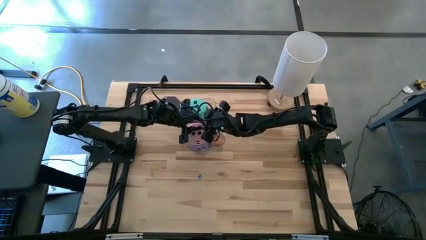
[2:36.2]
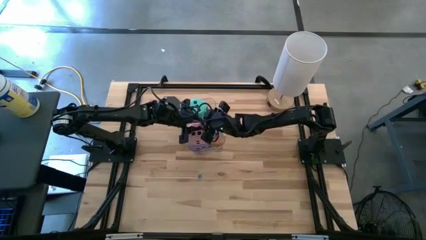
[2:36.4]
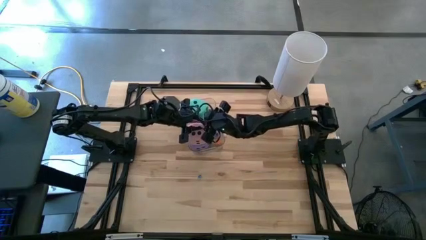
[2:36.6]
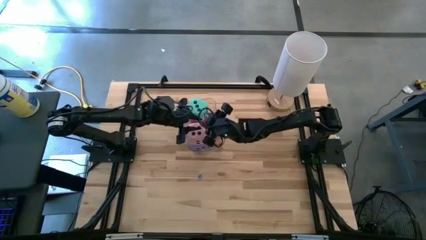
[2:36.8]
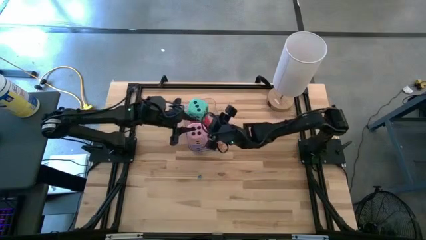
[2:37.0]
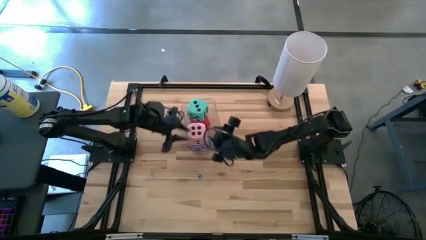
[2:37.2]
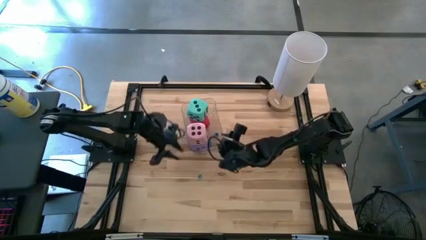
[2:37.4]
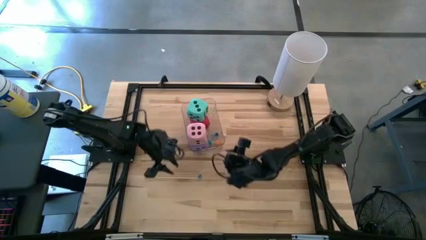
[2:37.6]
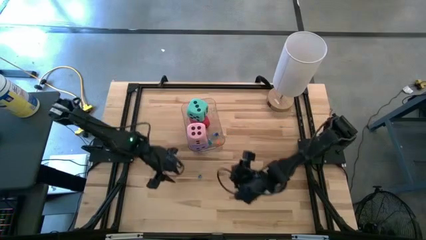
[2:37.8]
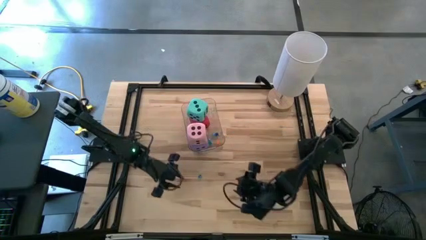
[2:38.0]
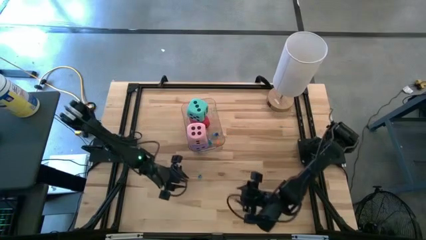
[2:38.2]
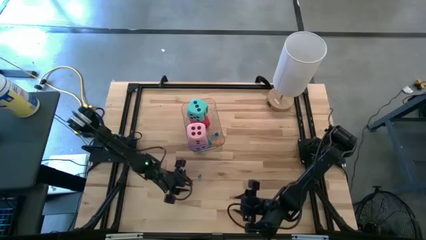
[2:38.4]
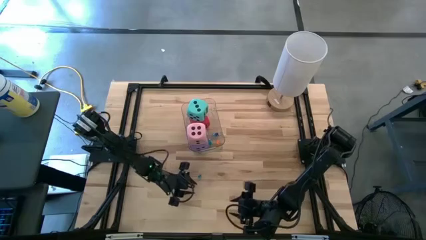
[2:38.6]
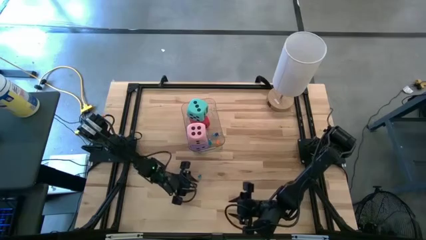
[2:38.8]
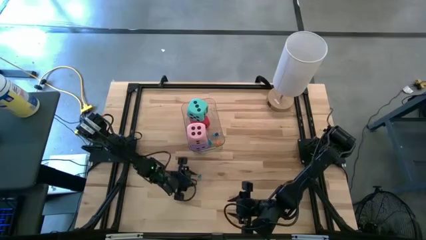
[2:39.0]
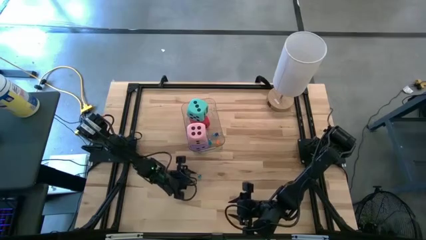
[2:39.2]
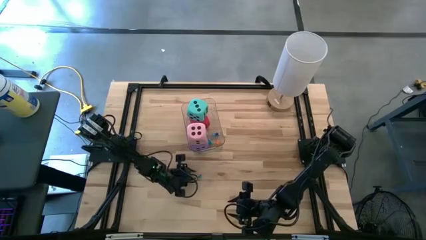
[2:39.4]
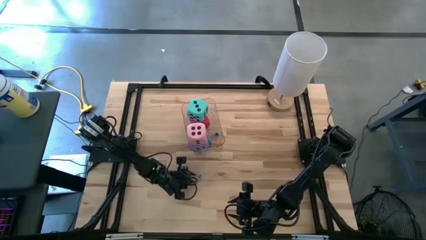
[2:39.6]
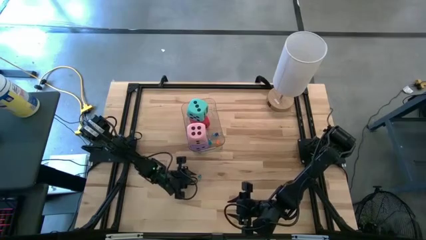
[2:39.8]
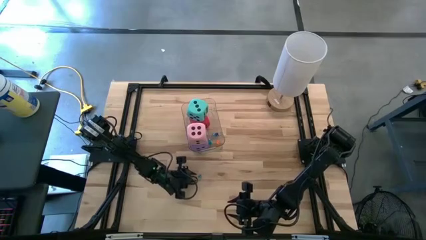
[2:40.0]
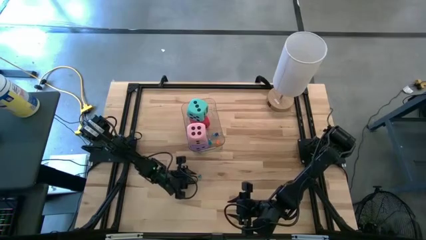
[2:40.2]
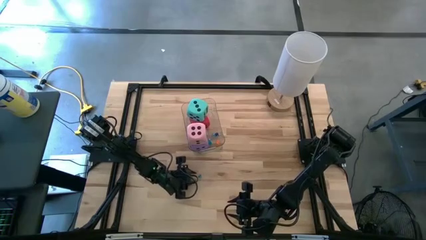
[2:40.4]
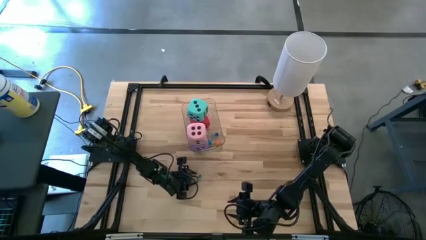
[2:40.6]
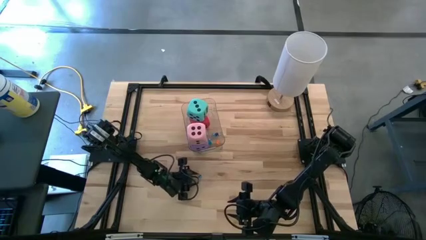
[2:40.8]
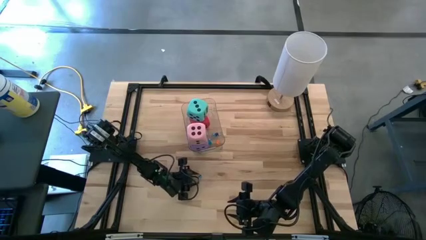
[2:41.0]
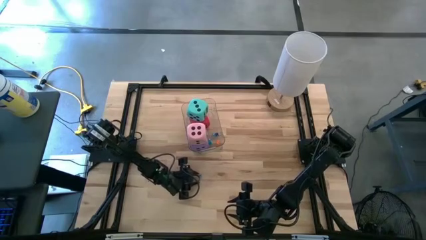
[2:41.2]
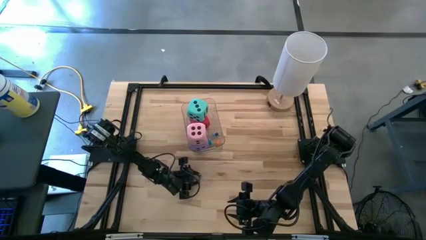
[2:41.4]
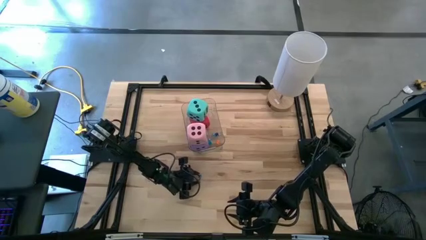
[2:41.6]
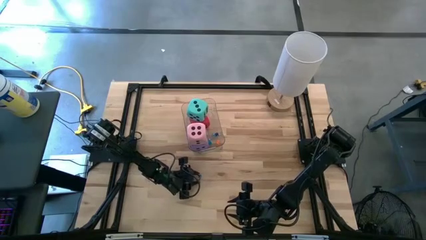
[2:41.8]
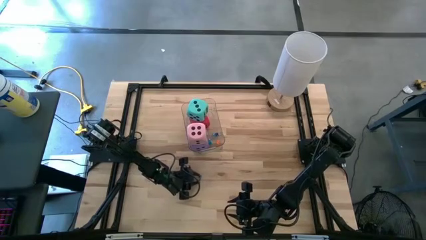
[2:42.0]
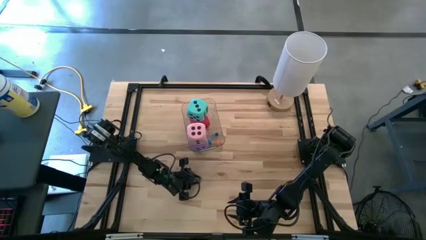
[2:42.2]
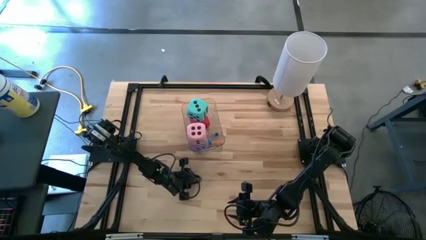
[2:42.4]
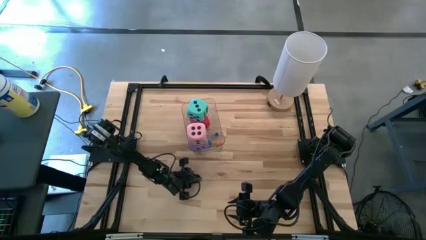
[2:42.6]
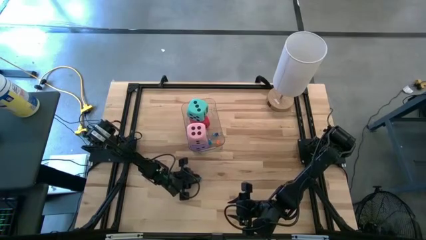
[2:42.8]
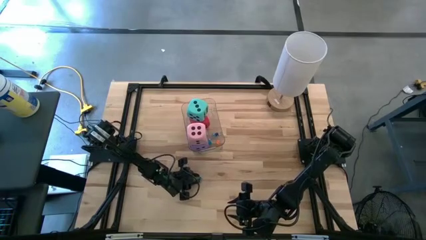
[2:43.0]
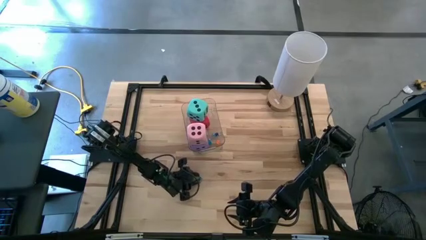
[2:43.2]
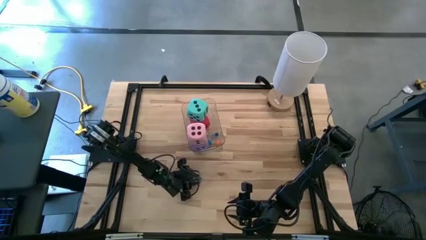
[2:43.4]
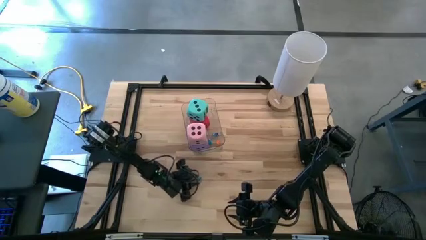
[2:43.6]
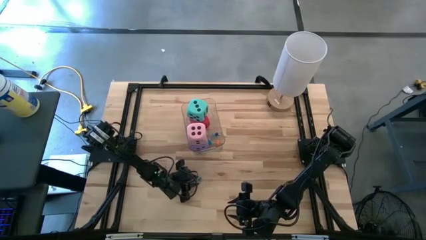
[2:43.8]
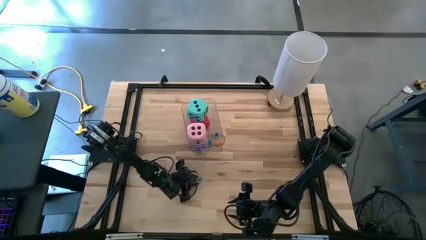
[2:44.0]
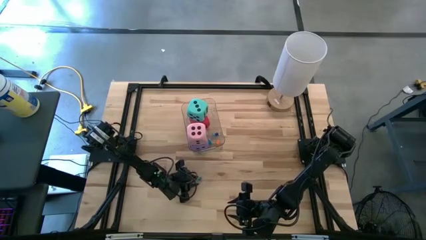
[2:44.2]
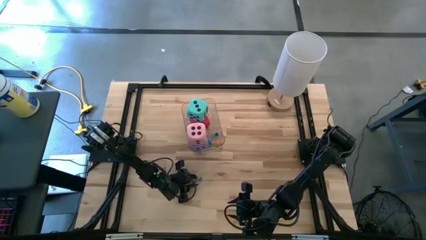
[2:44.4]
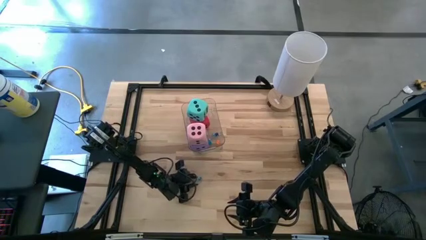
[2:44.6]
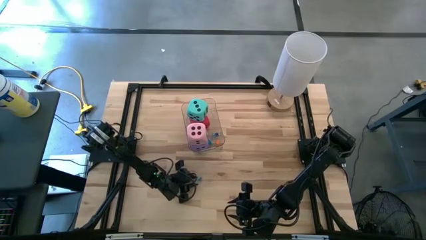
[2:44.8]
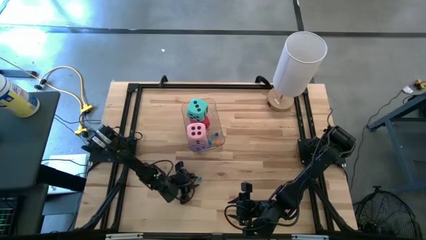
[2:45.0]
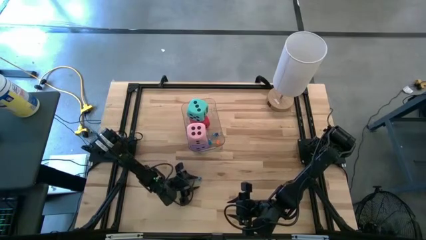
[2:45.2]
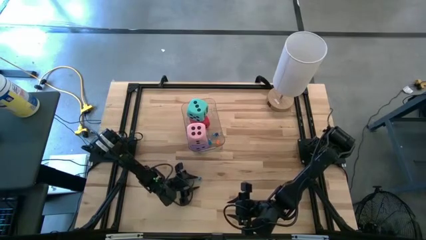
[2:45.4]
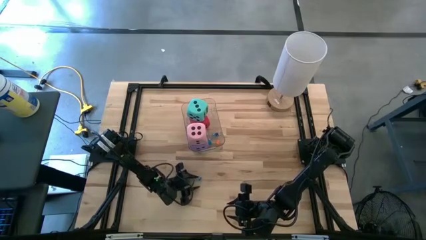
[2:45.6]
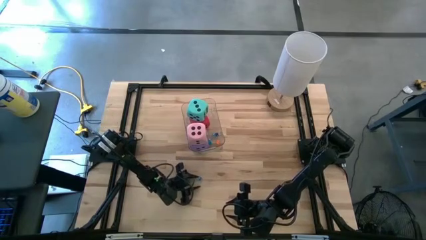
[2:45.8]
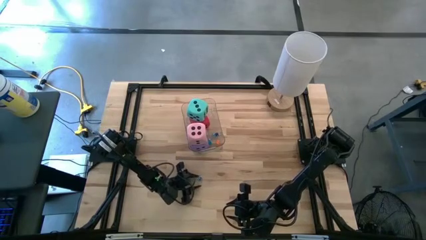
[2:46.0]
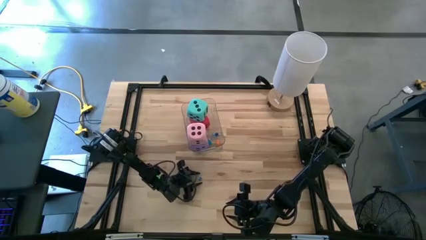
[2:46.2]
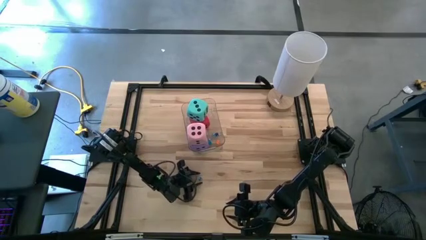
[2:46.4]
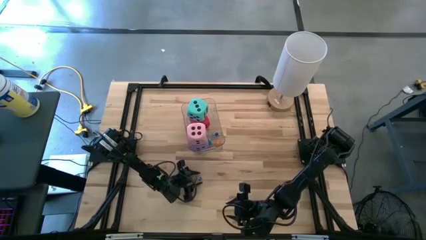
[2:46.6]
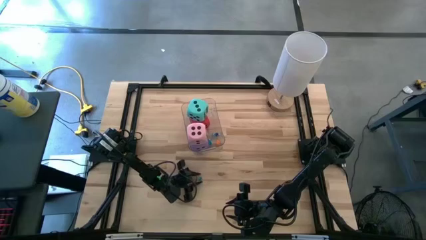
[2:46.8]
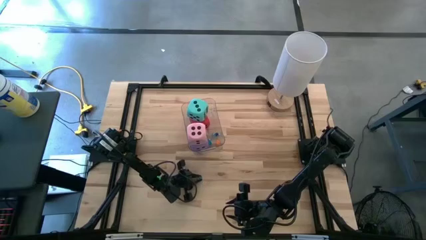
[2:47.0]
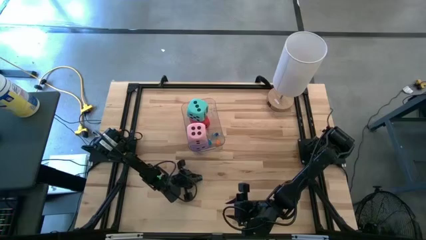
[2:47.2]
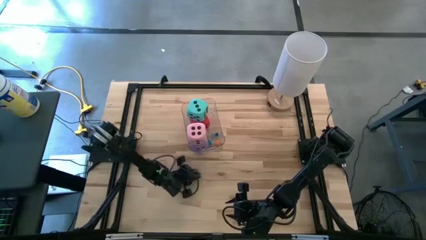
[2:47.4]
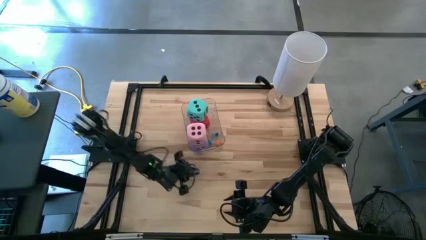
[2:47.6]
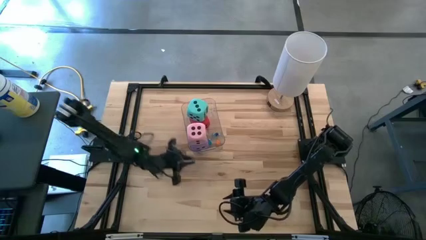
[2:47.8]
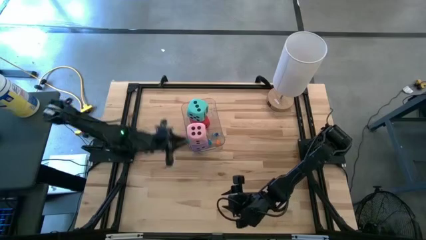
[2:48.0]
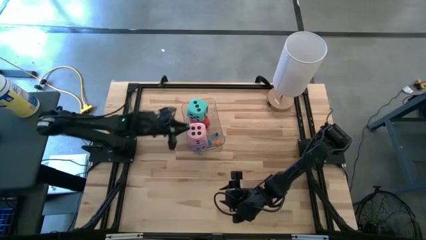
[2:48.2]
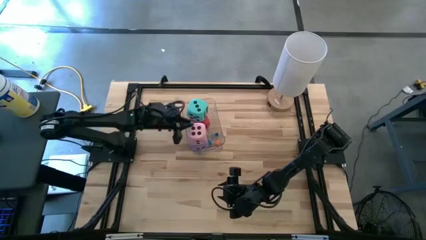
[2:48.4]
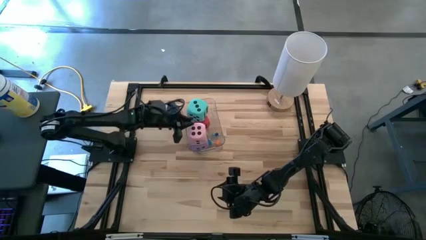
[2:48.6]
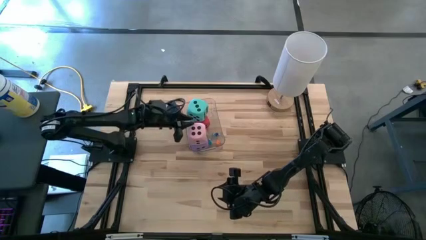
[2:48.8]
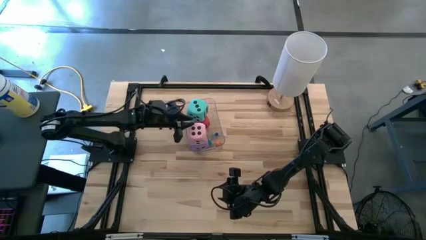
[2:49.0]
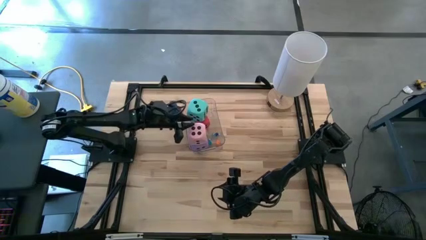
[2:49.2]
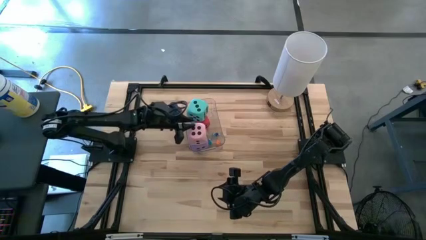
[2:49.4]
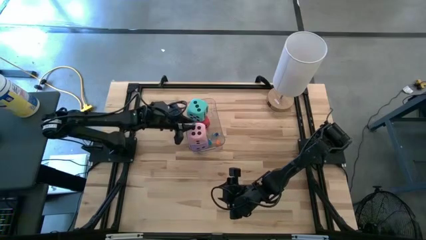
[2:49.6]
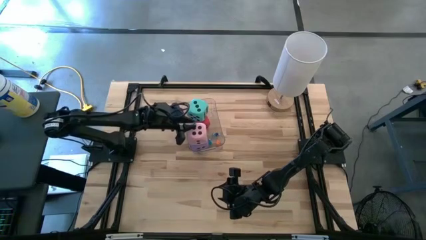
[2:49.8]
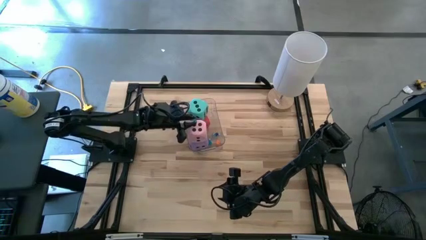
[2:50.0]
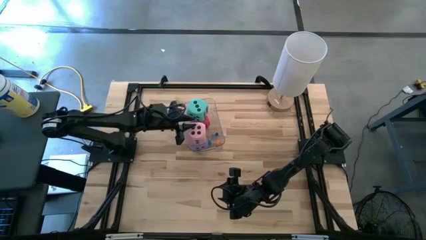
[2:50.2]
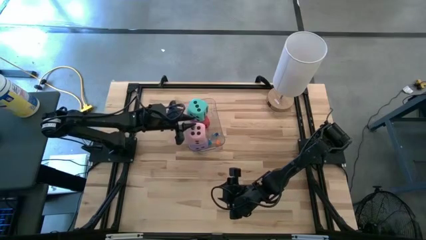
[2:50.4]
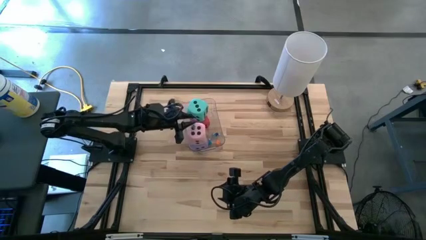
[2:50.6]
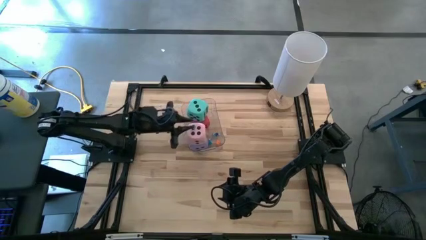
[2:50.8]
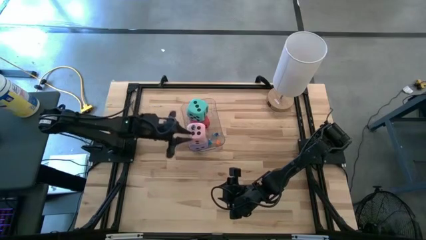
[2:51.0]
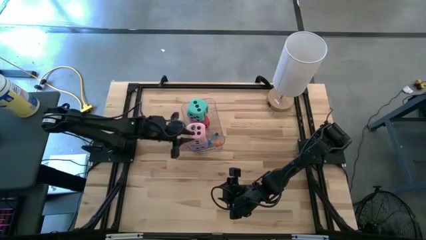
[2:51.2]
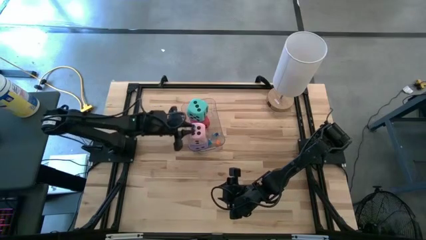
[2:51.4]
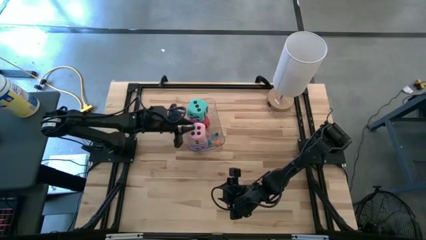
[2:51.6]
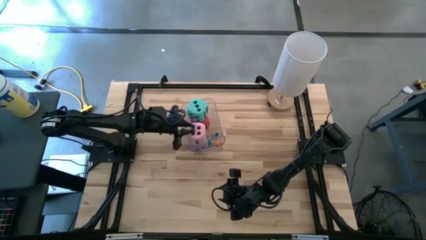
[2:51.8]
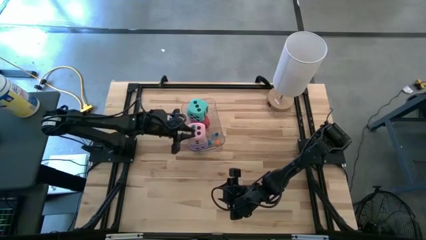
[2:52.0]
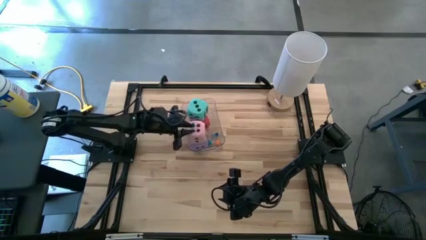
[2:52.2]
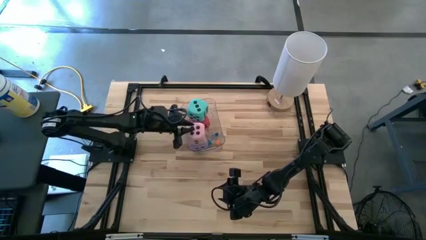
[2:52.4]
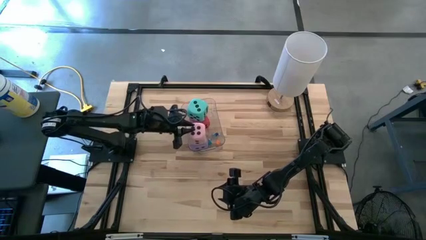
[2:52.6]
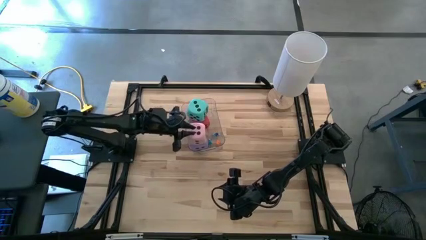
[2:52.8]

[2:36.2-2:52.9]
Task: Pick & Place Dice
Put the small light blue die into the transparent bin
